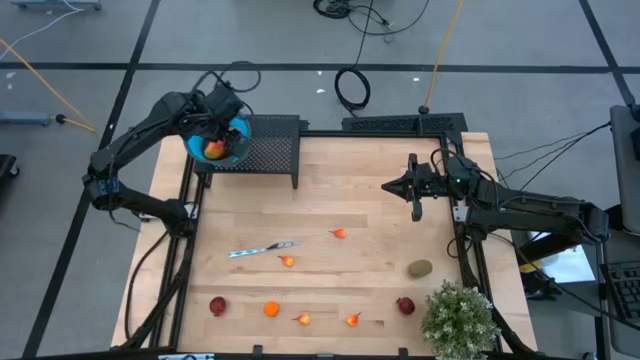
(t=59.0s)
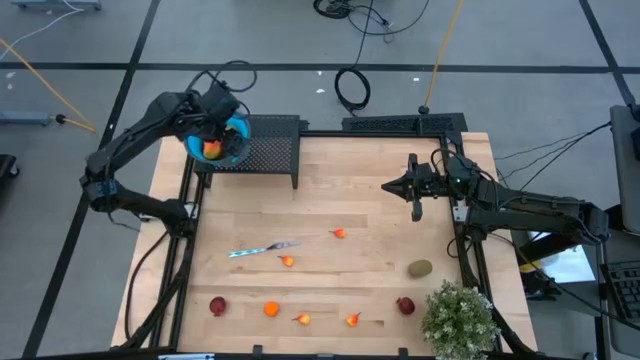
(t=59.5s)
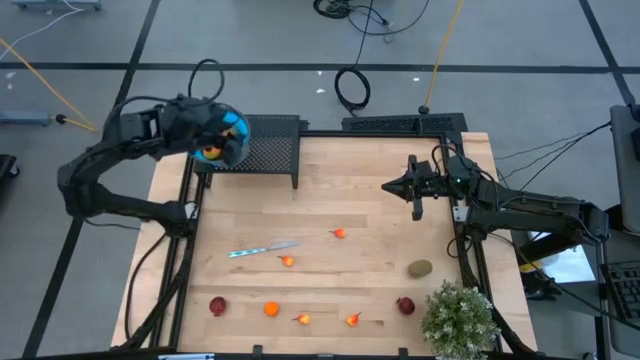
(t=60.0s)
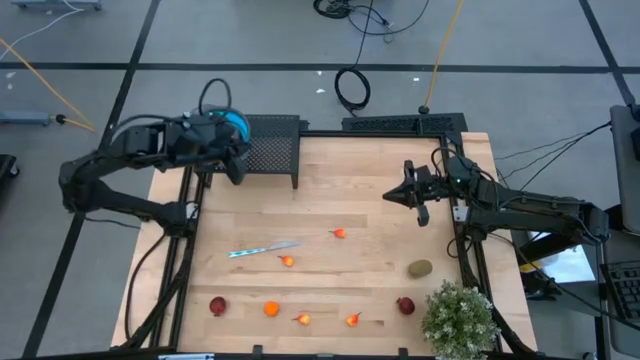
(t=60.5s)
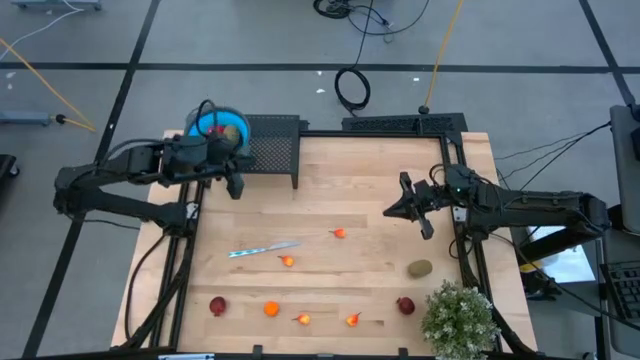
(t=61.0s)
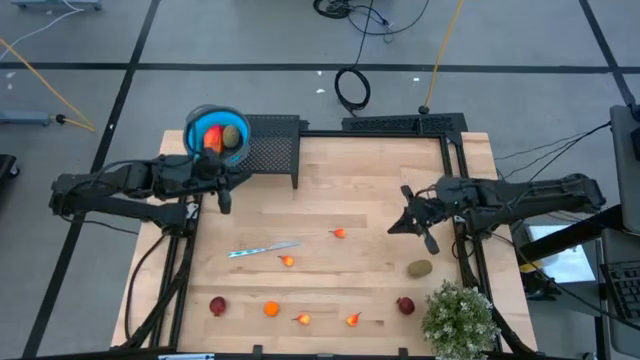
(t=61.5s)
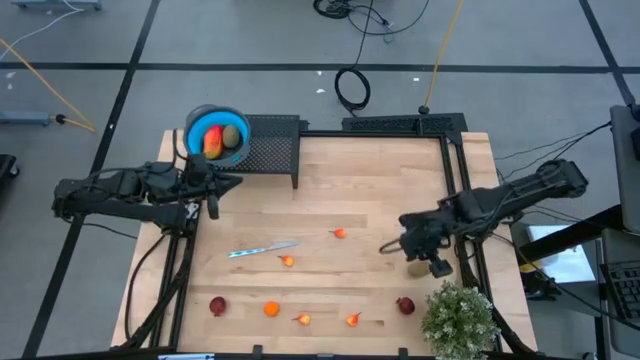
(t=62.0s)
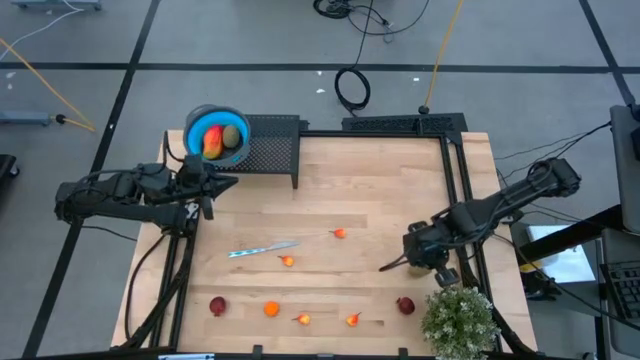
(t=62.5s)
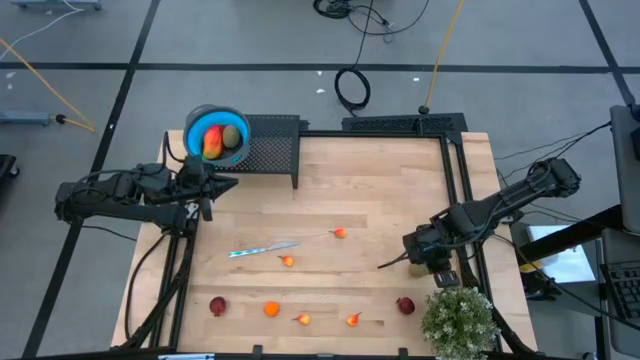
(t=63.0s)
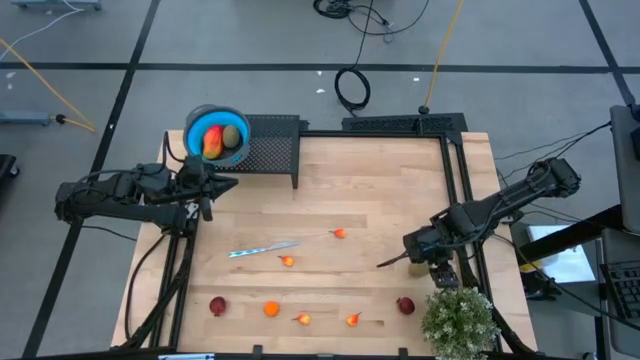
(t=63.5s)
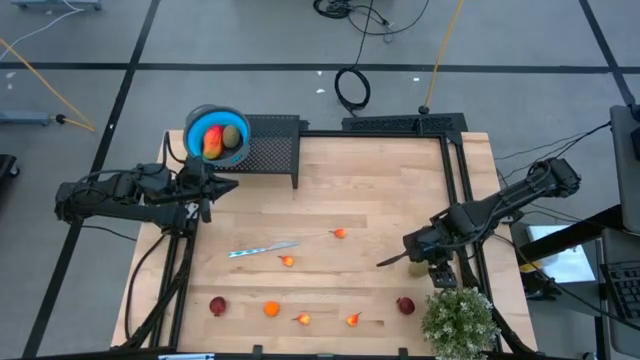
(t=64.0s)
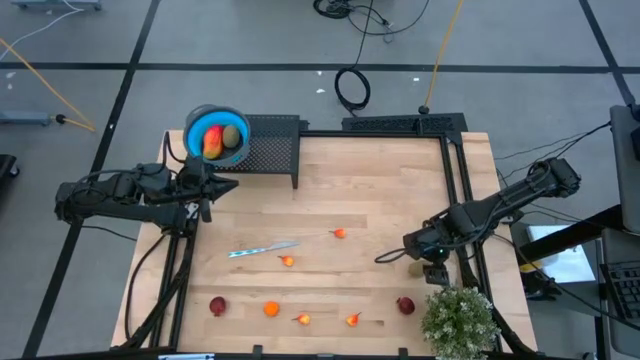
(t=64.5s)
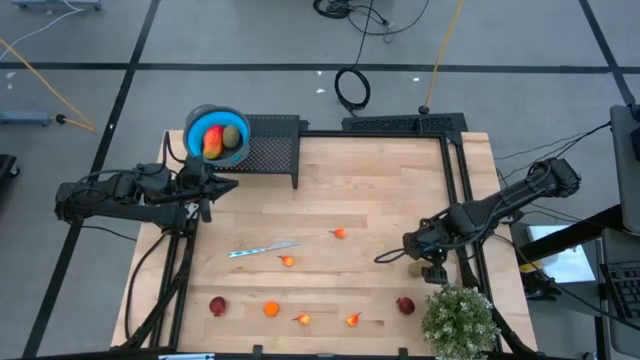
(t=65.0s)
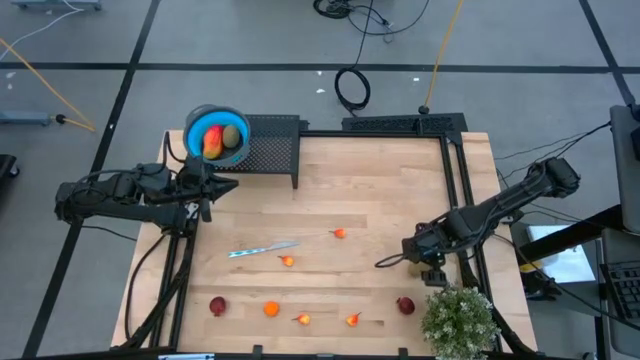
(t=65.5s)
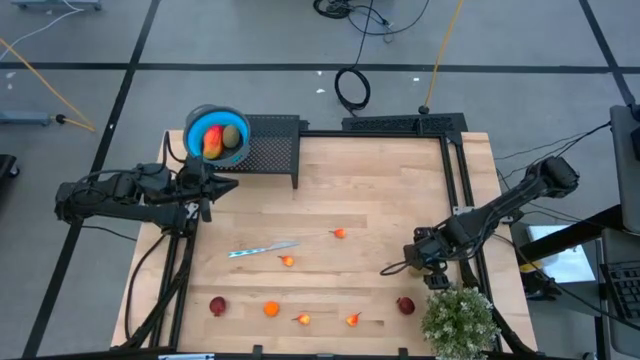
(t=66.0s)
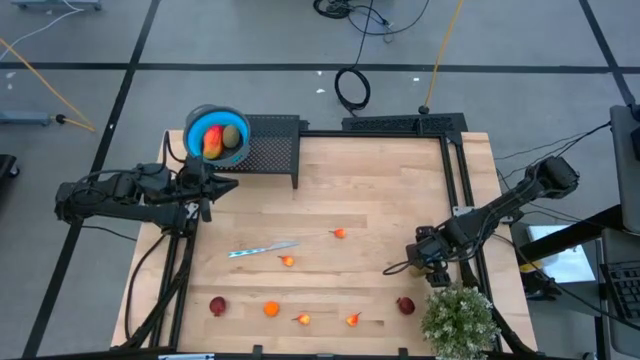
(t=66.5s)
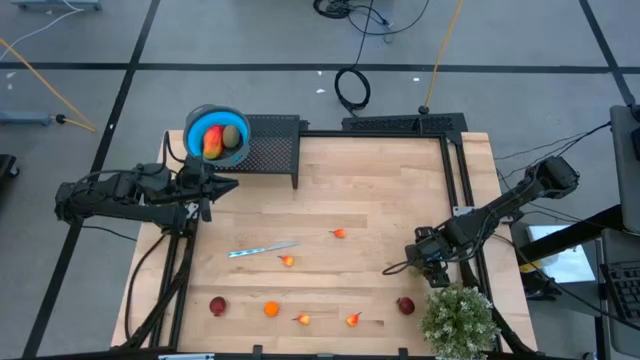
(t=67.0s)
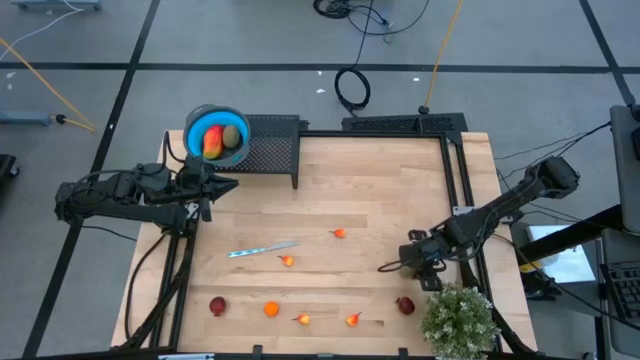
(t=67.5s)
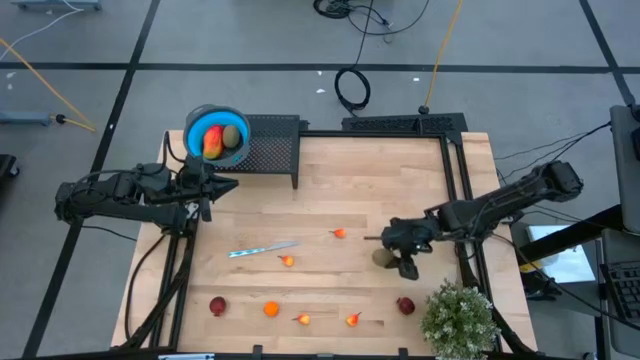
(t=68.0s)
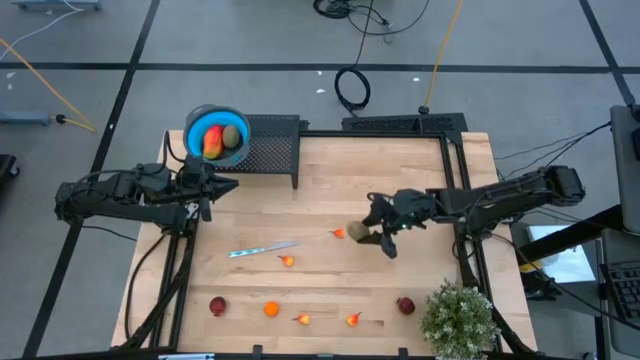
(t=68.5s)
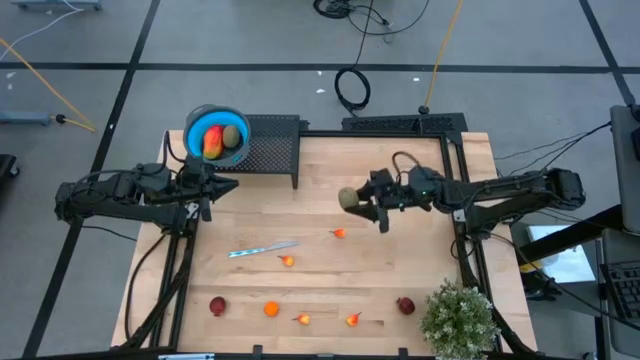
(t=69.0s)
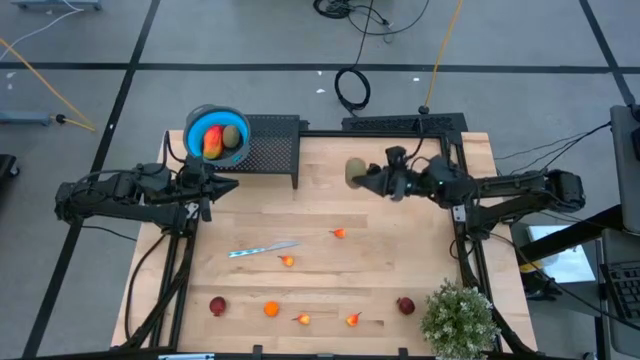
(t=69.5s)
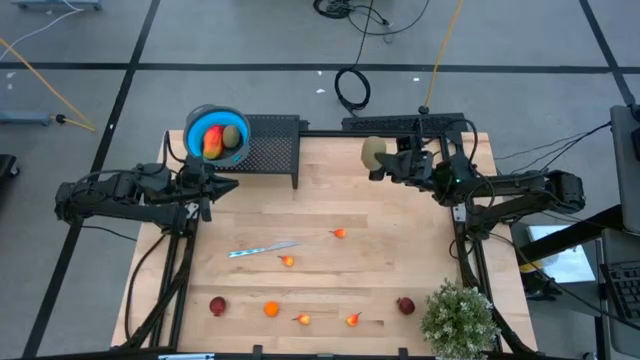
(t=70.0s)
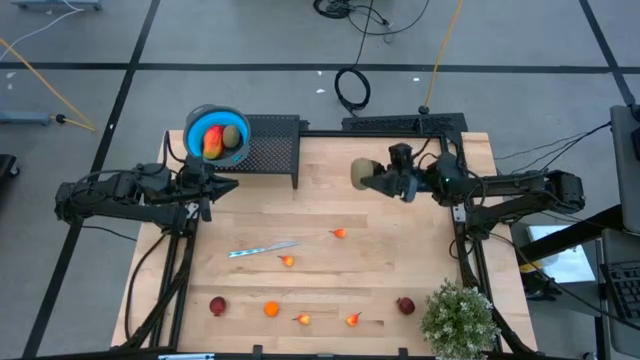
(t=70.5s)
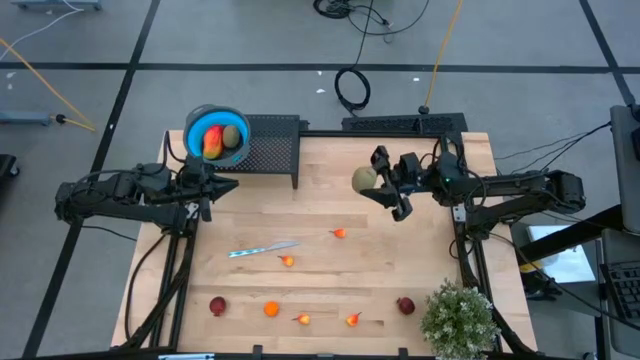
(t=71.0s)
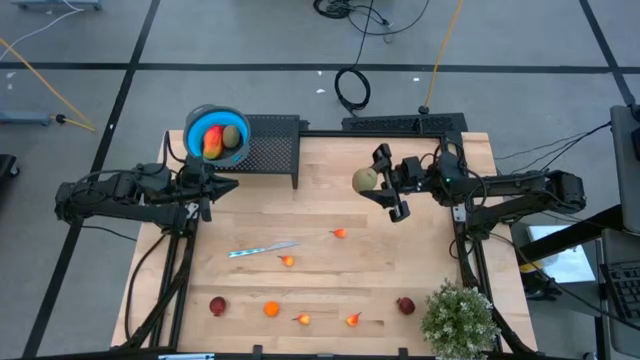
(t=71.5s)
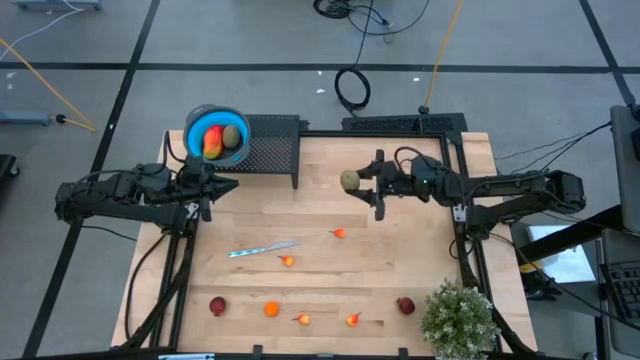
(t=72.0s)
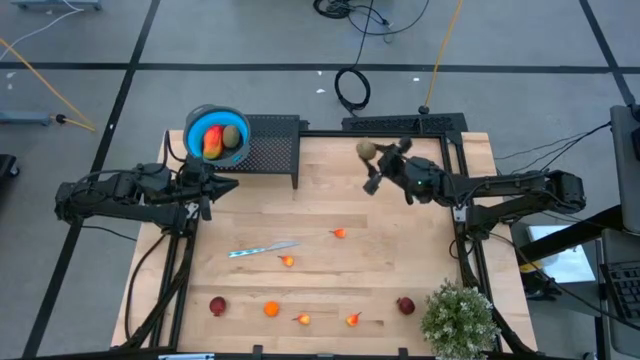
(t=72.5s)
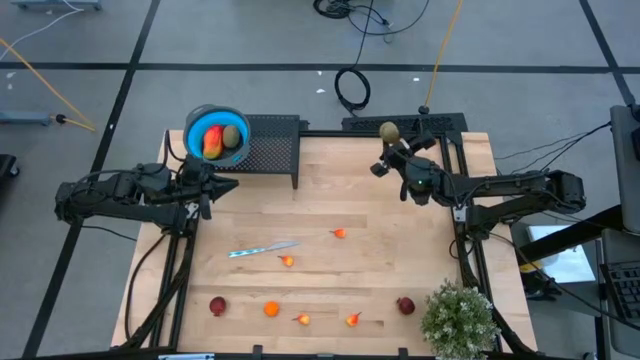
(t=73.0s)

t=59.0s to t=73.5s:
Task: Pick & Place Fruit
Put the kiwi into the blue strainer bowl on the shelf

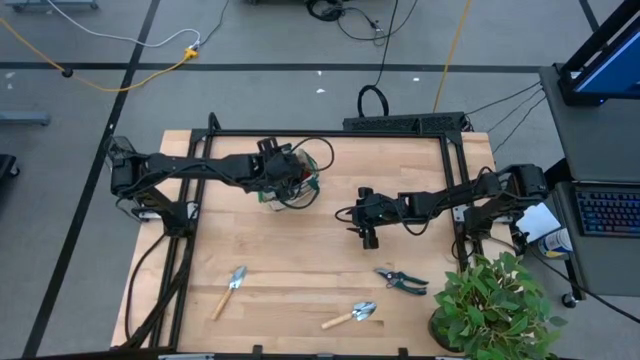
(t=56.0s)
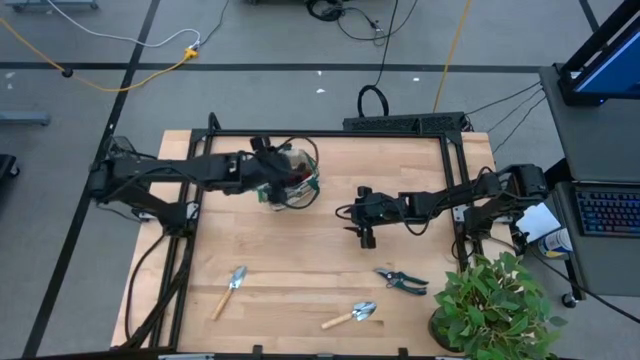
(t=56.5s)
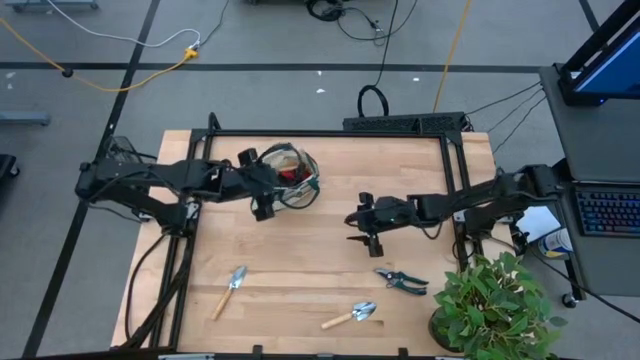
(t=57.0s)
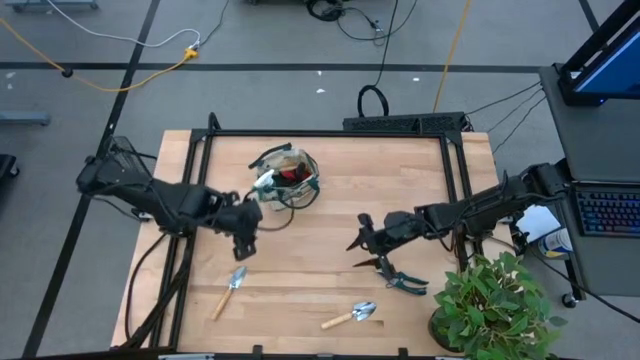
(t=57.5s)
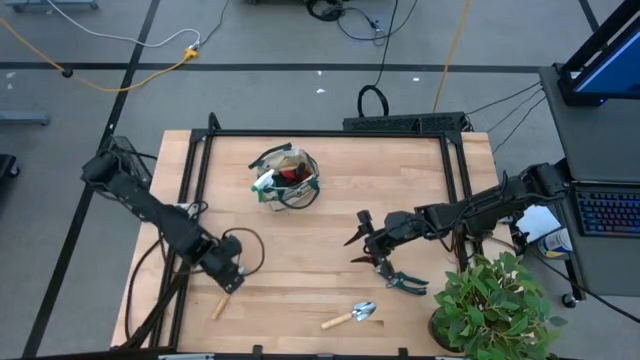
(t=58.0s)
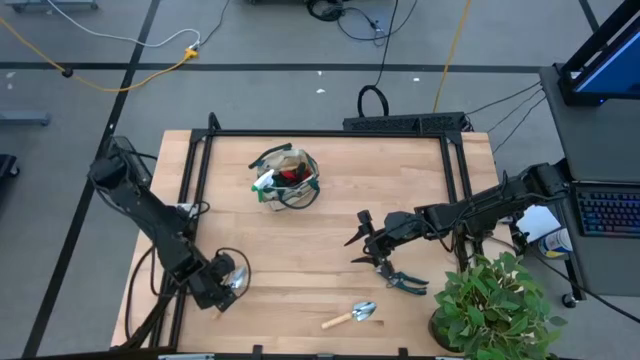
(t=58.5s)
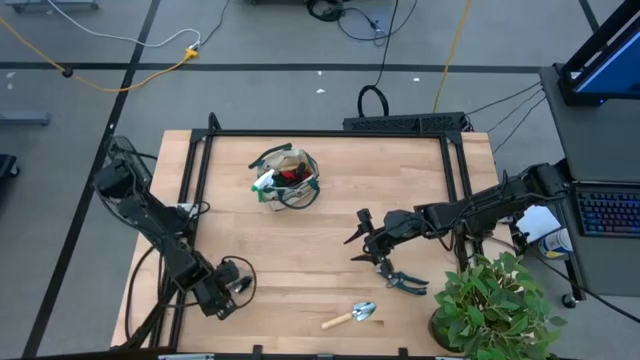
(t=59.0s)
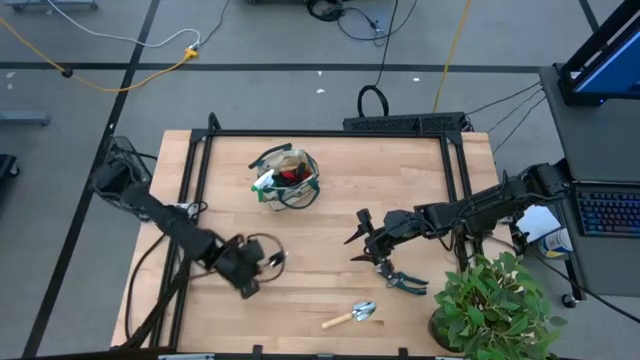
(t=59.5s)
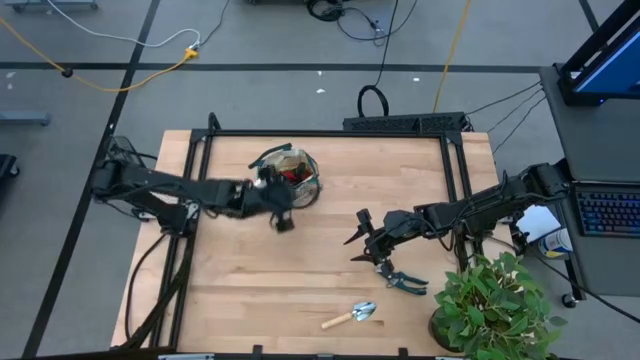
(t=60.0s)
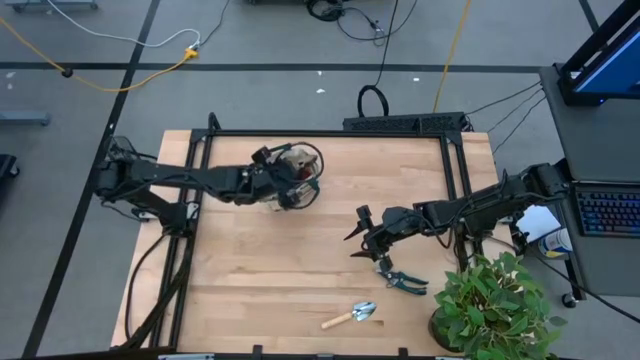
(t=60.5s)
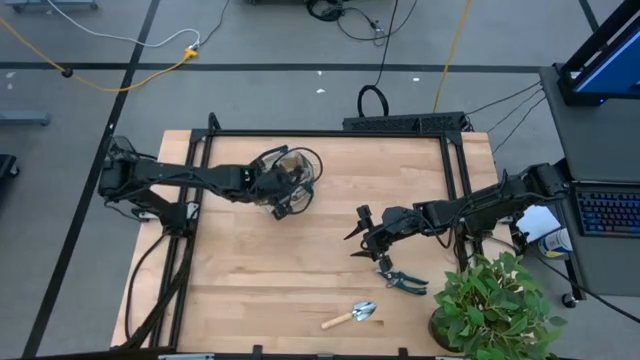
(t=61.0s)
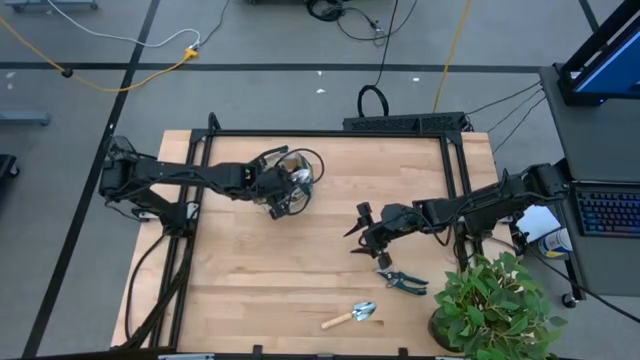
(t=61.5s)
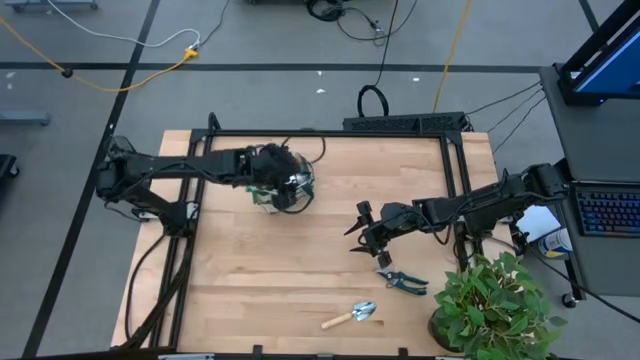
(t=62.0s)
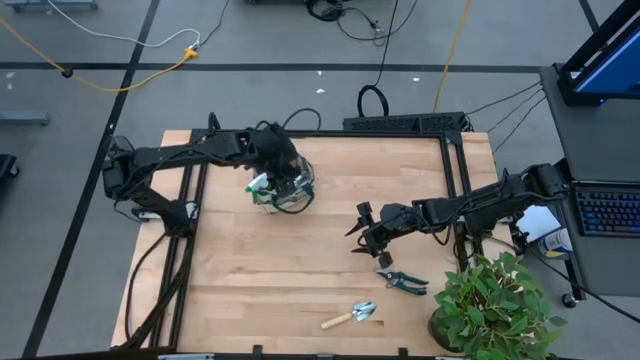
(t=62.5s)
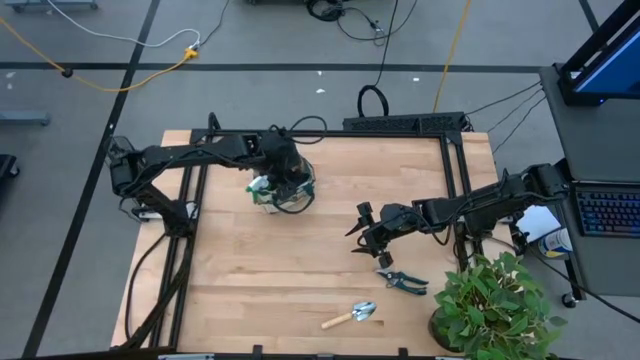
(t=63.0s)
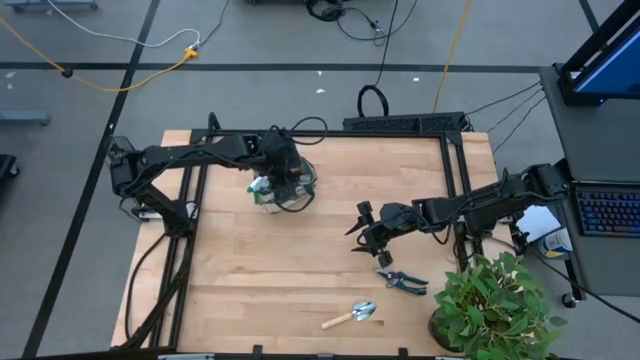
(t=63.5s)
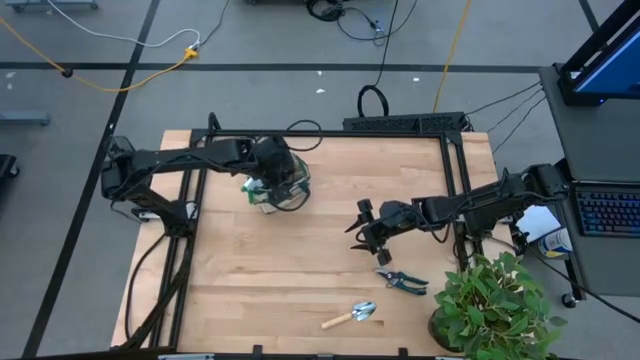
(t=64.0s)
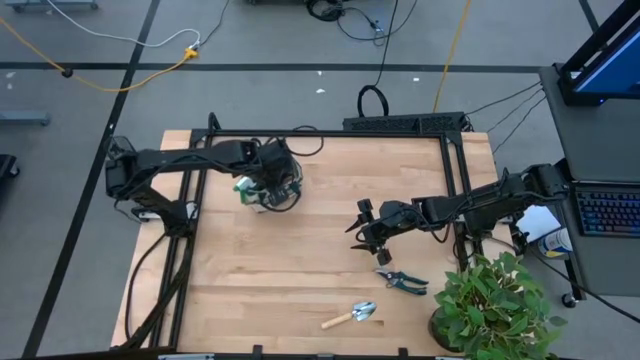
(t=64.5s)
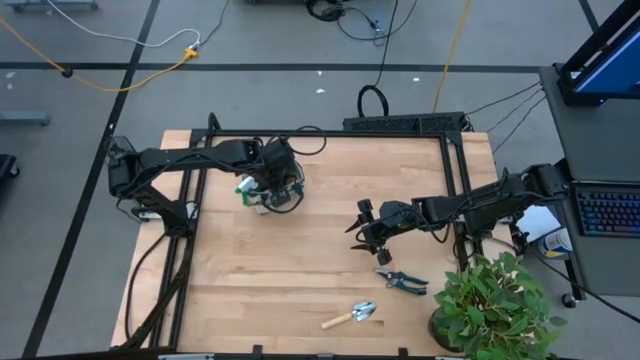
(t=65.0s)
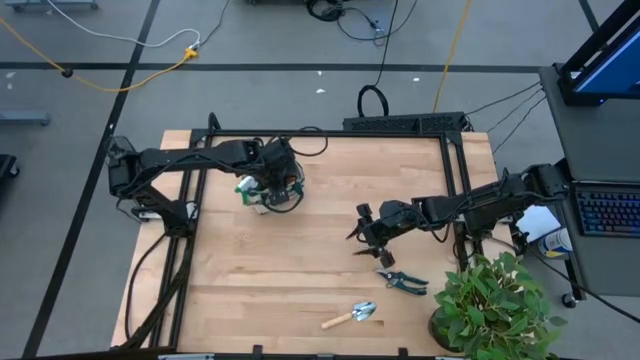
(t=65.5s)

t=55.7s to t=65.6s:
Task: Pick & Place Garden tools in Gardening bag
Put the left trowel into the gardening bag
